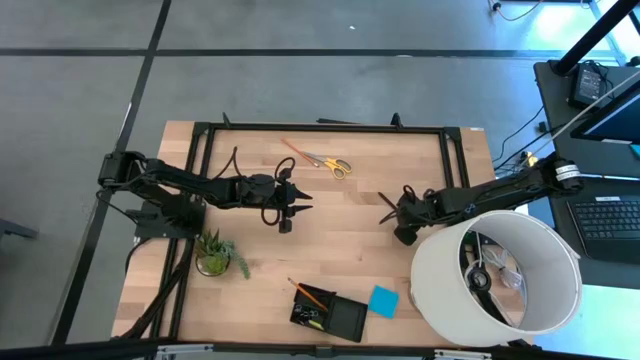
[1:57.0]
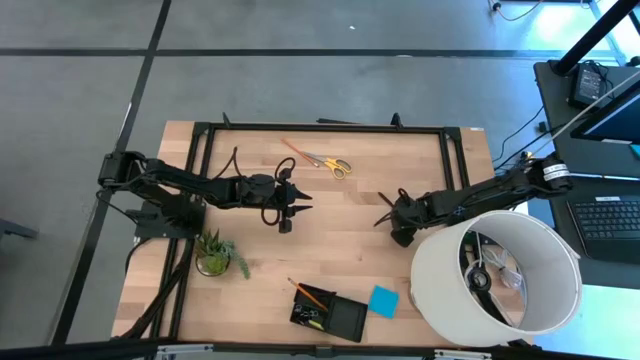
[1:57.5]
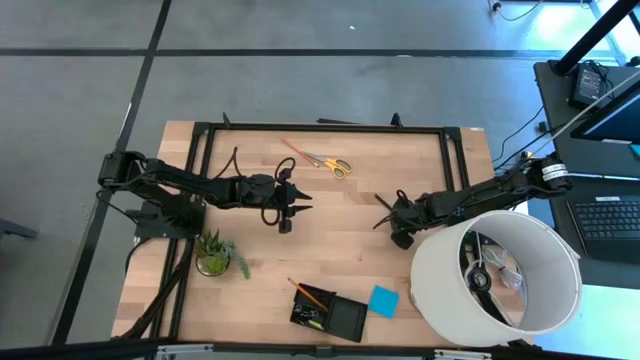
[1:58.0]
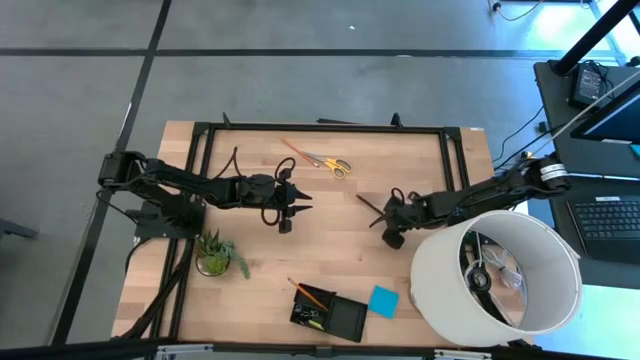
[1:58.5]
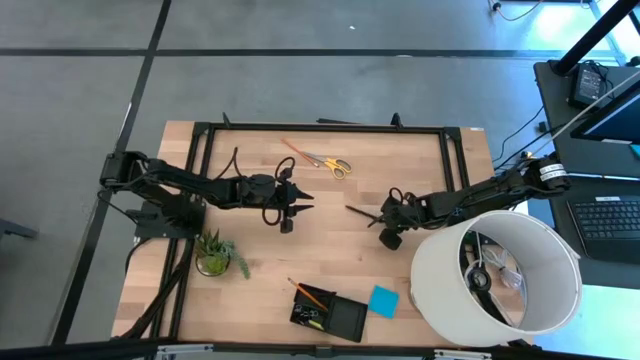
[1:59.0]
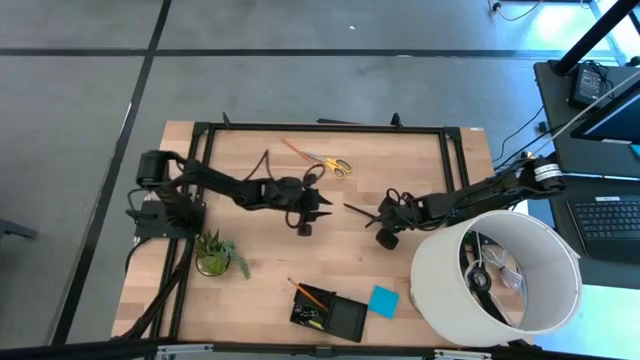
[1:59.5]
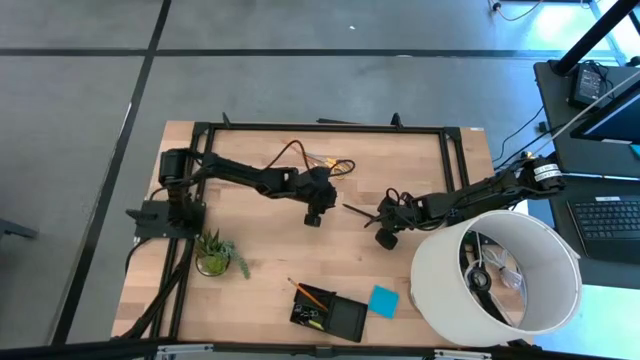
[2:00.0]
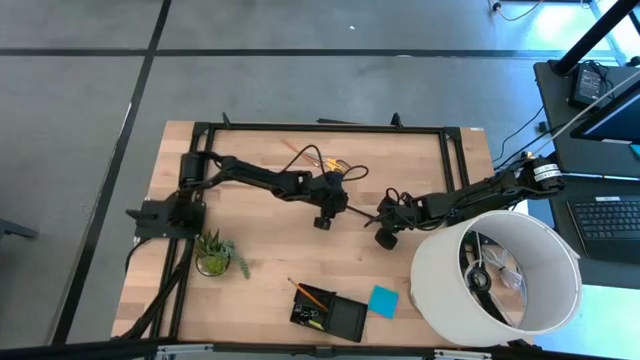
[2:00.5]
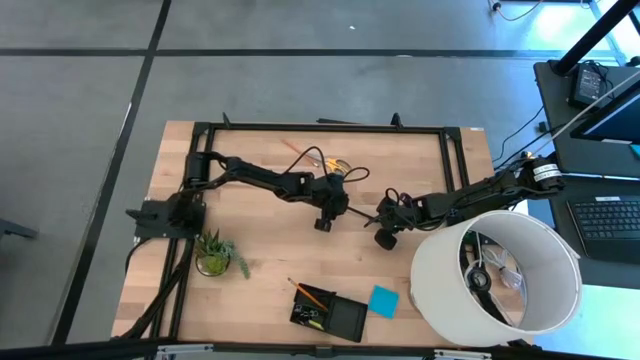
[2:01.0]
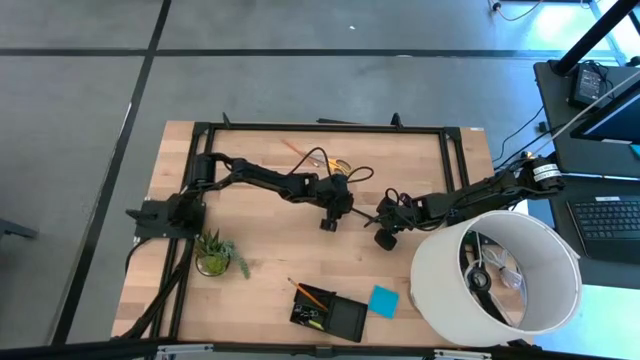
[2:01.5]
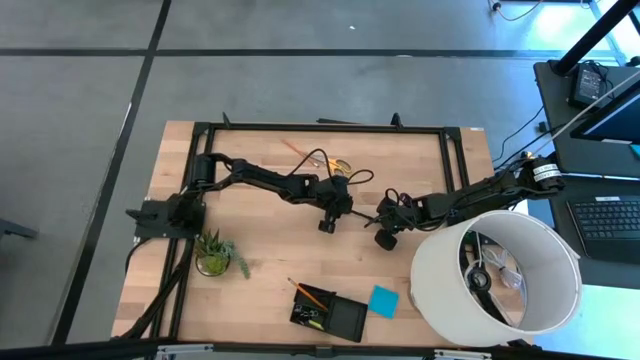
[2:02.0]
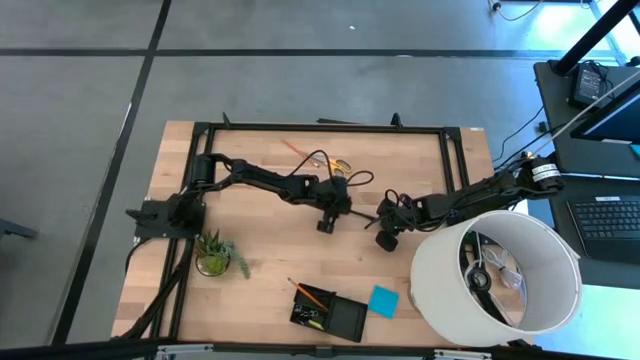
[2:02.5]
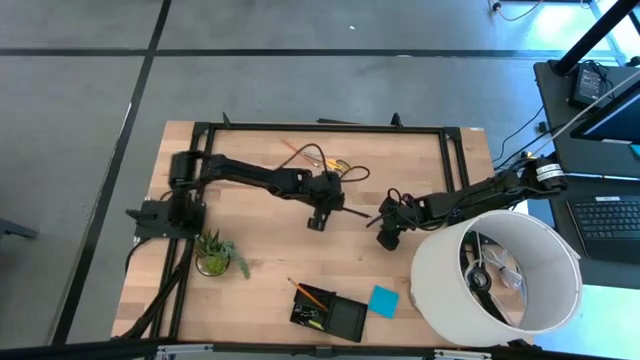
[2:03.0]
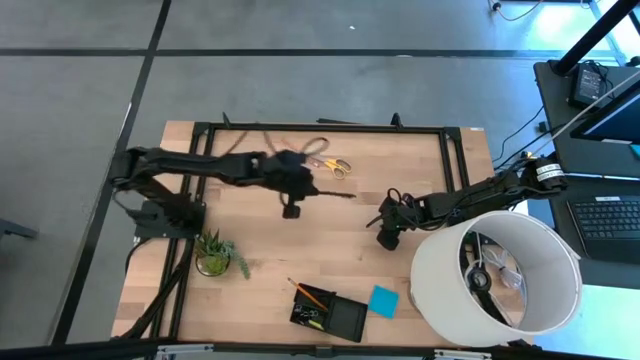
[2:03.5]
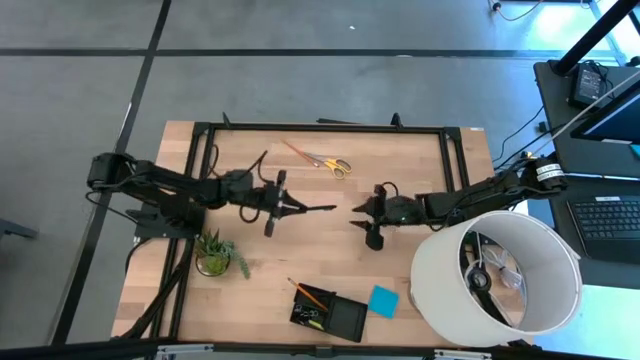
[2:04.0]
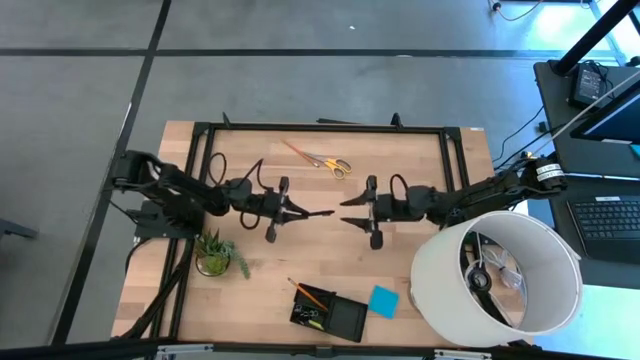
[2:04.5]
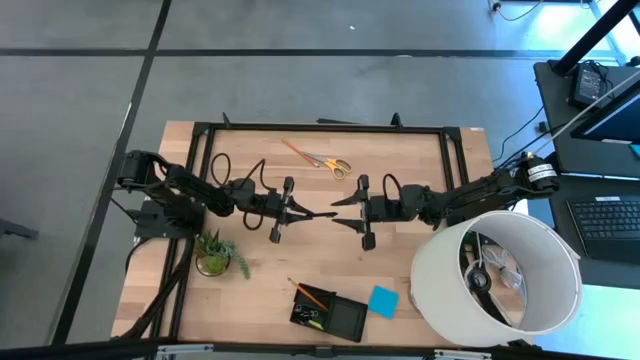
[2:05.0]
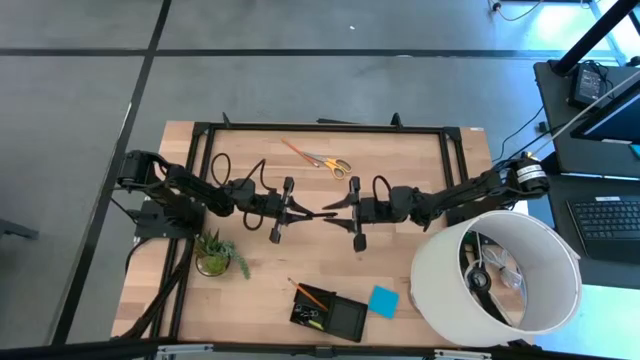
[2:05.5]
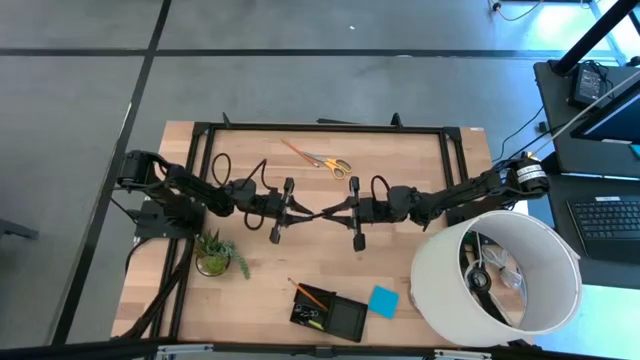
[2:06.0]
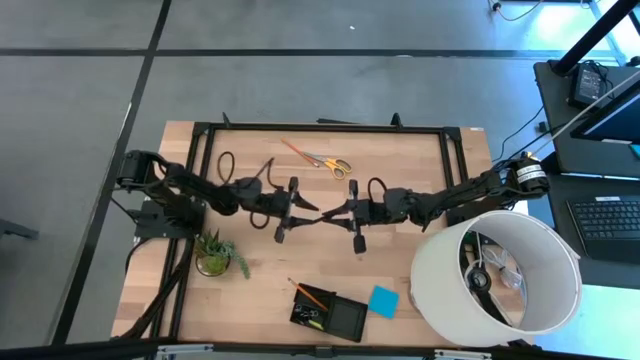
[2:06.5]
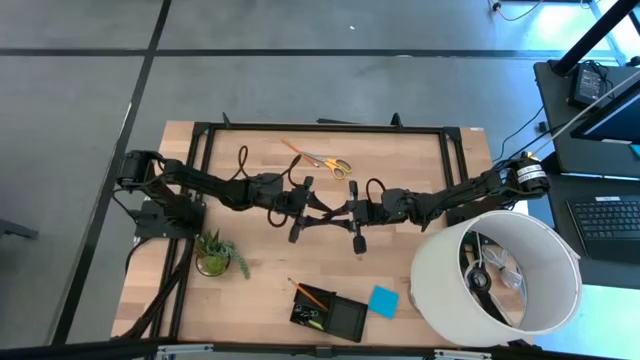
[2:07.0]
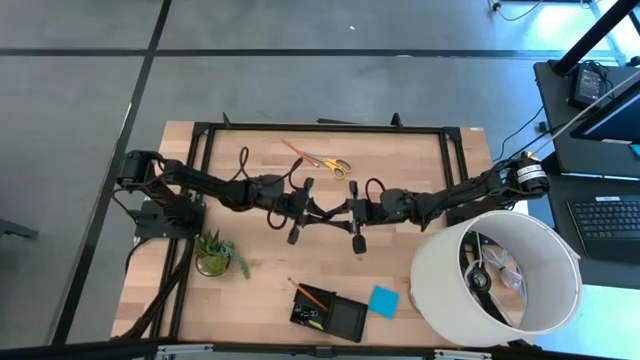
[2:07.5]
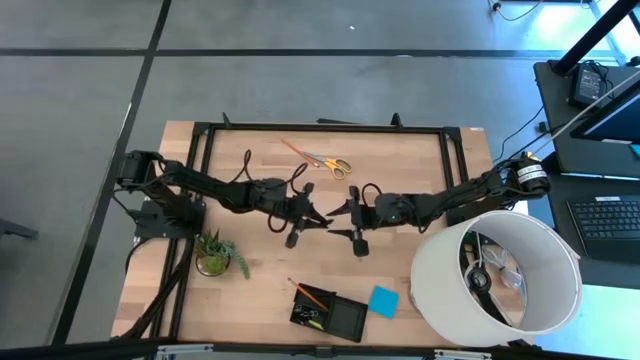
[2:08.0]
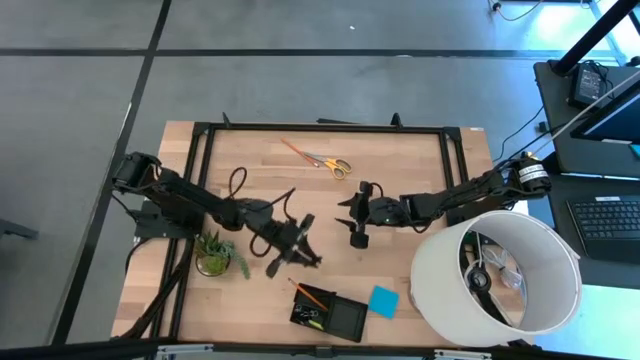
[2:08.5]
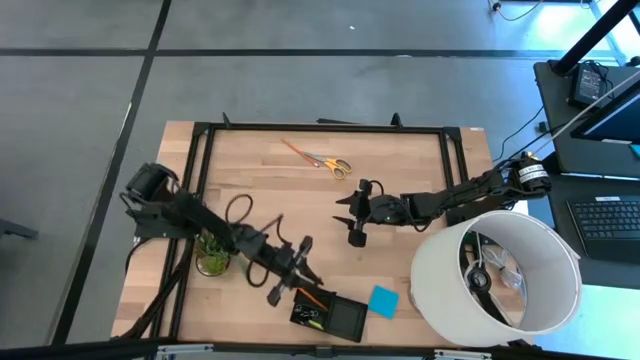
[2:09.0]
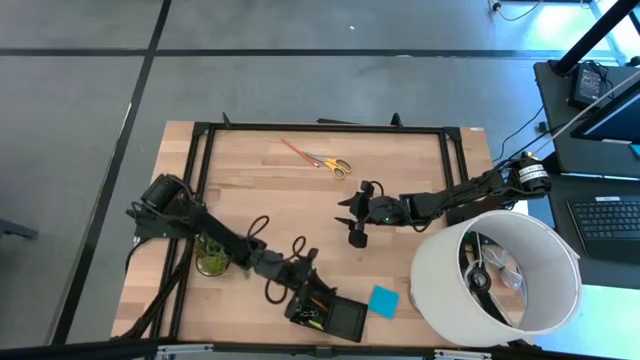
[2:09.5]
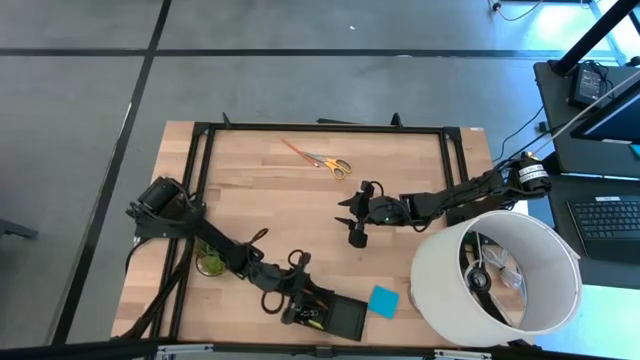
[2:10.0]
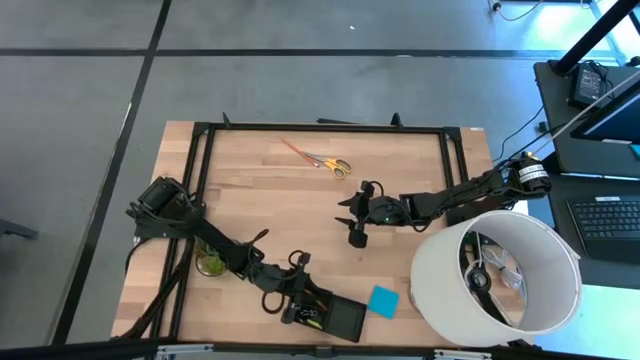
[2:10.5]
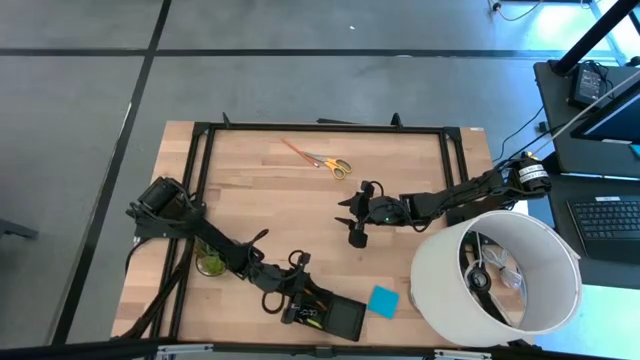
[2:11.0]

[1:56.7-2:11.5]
Task: Pick and place office supplies into organizer
Put the black pen into the black desk organizer

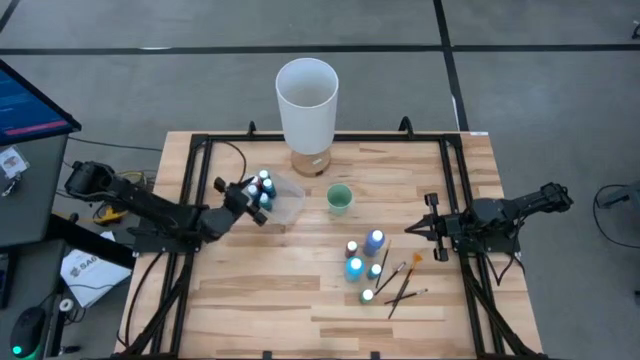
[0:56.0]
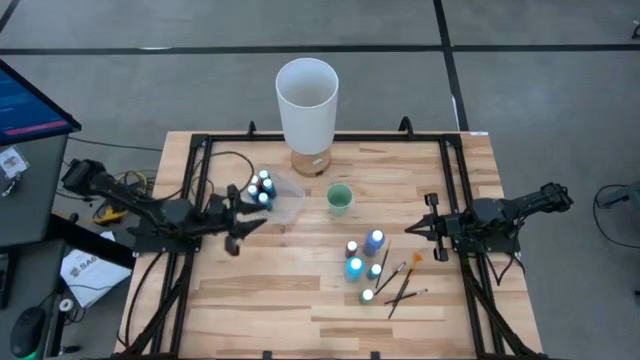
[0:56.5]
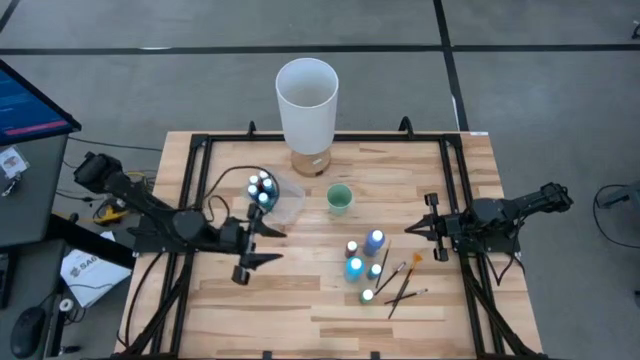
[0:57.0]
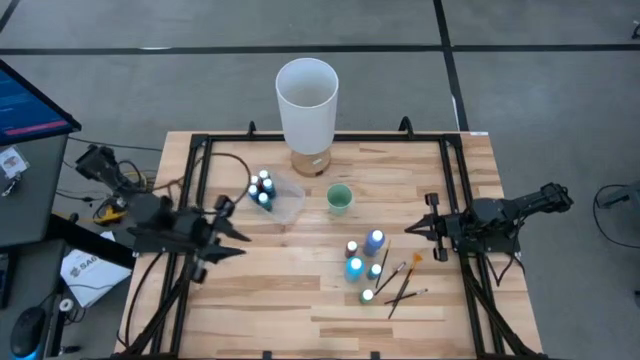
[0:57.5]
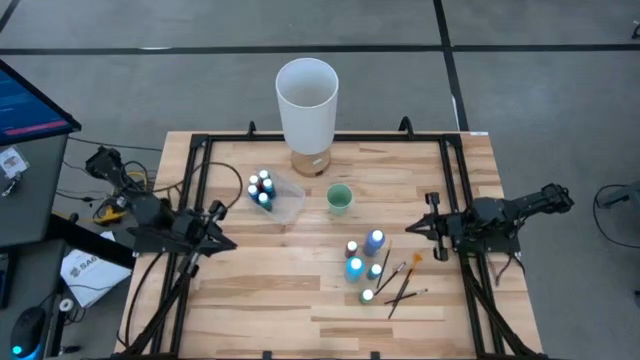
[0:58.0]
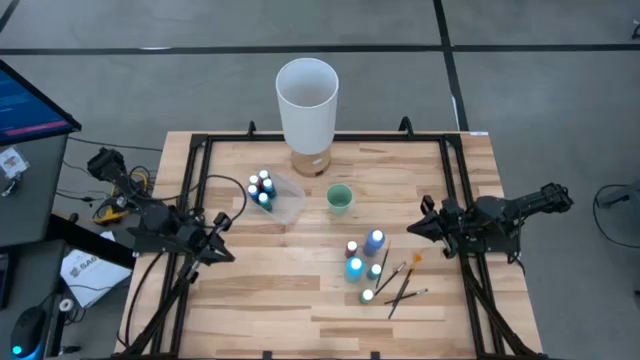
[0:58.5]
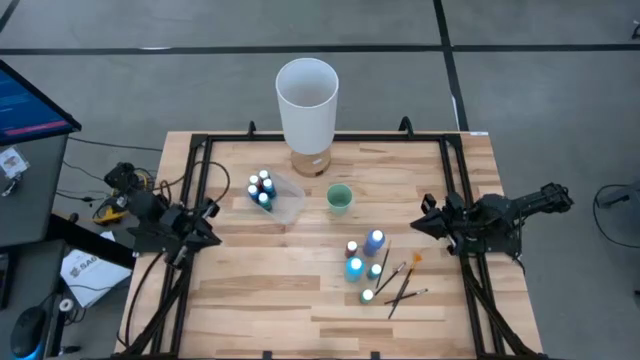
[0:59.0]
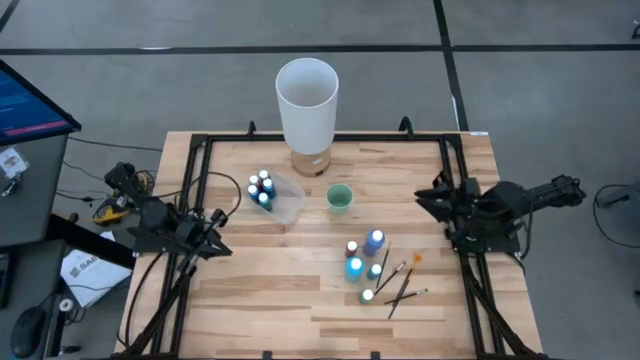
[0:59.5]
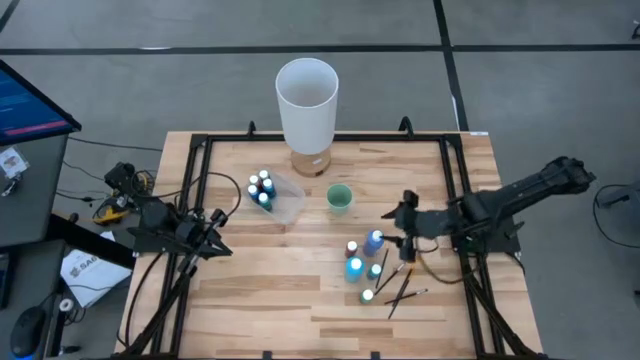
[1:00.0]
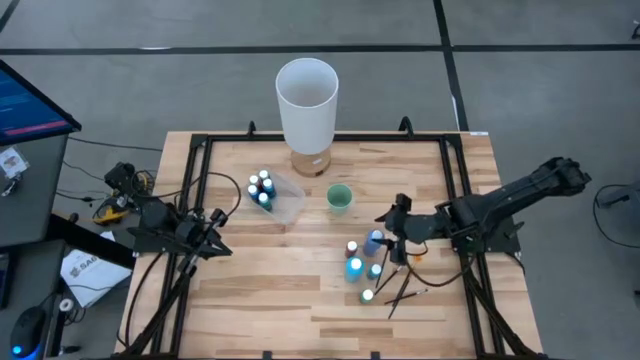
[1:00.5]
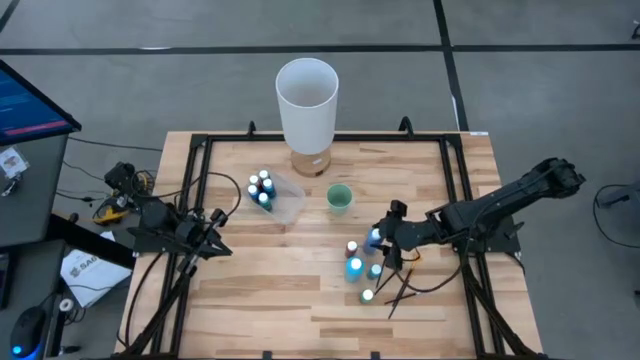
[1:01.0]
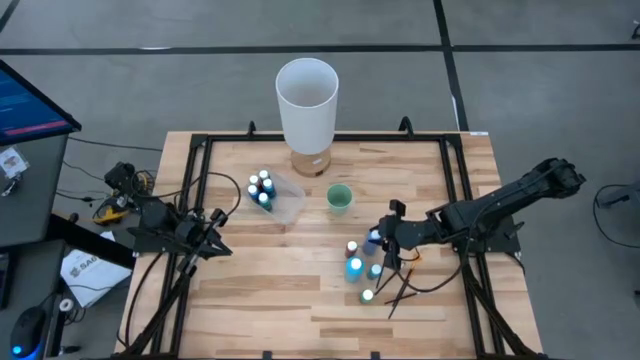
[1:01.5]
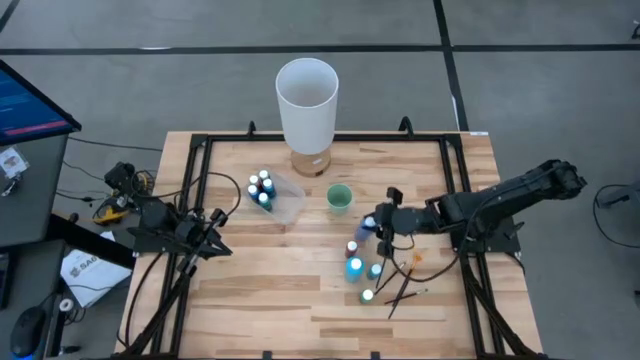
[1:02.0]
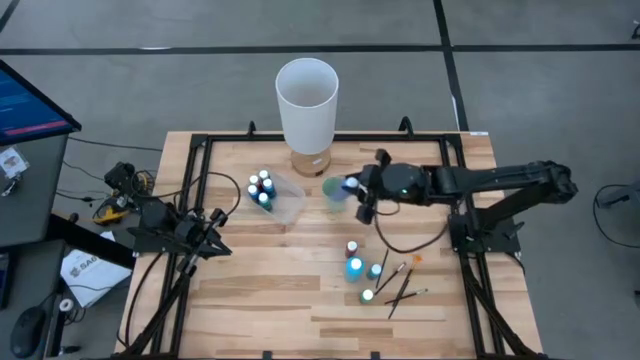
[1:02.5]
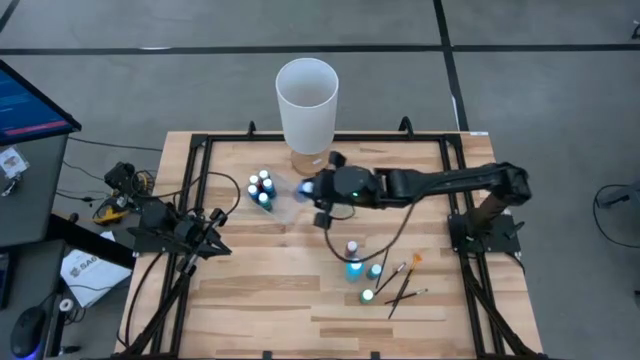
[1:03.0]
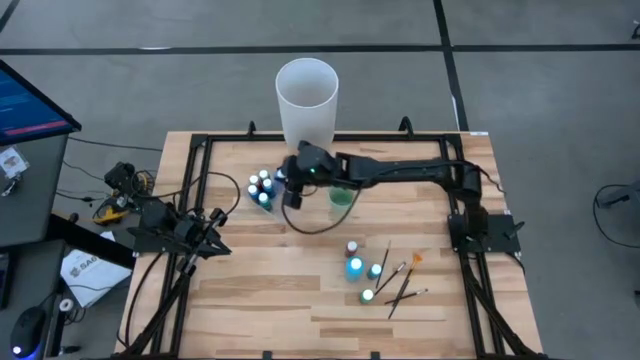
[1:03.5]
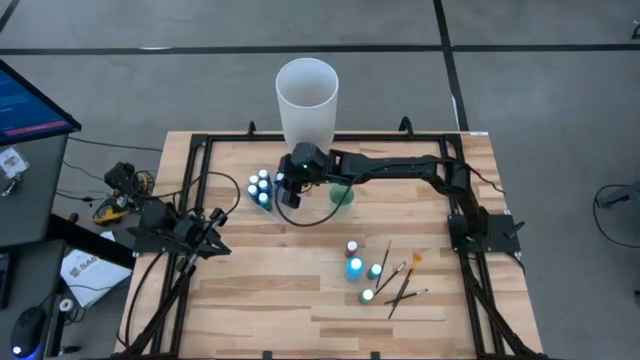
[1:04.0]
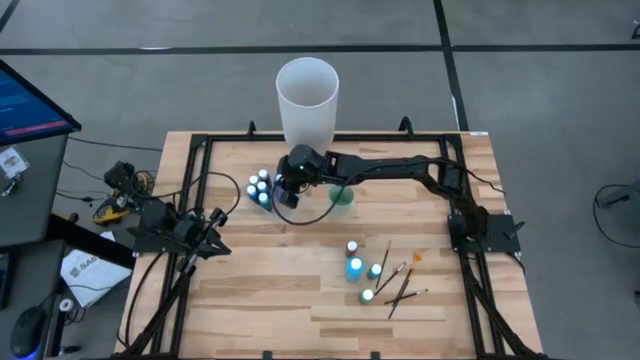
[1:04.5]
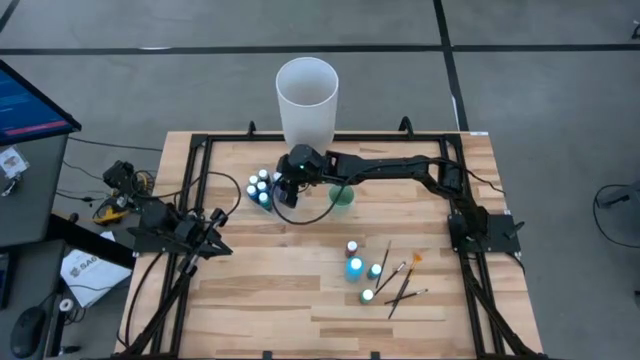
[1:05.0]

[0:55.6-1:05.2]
Task: Pick & Place Paint Supplies
Put the purple paint bottle into the transparent bin
